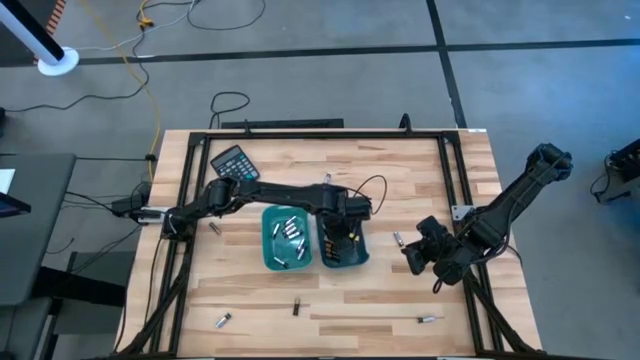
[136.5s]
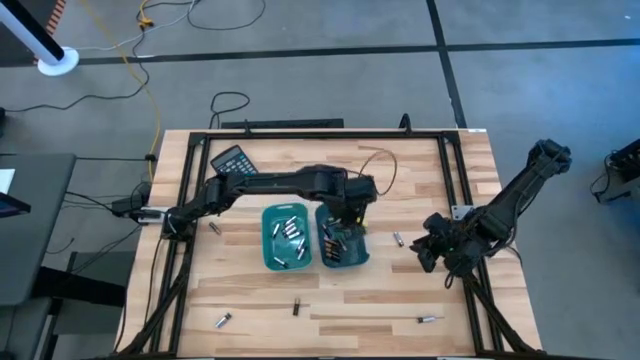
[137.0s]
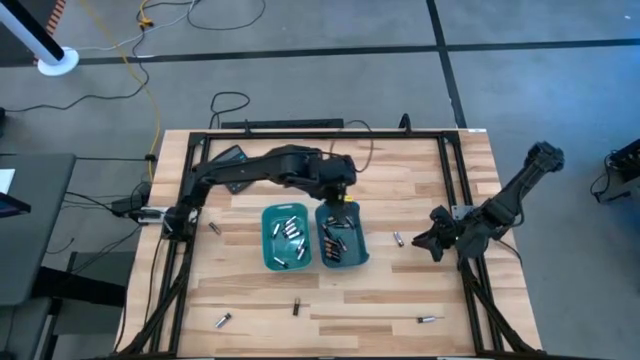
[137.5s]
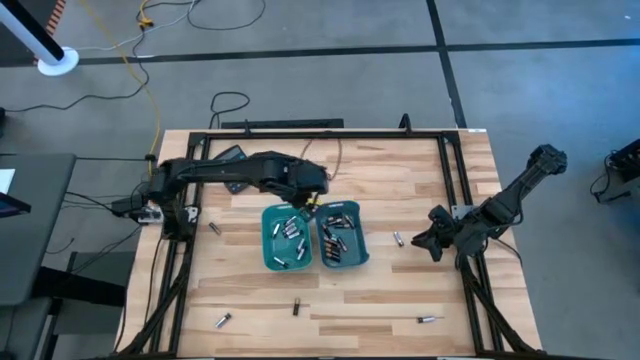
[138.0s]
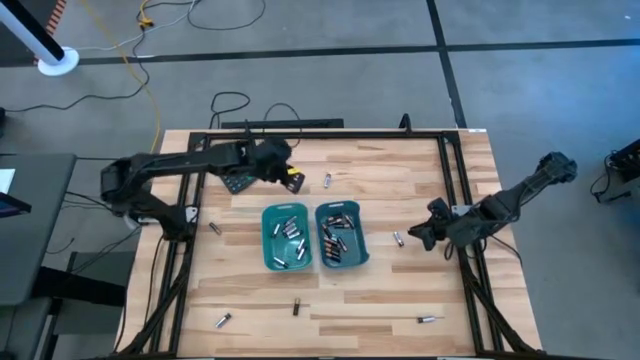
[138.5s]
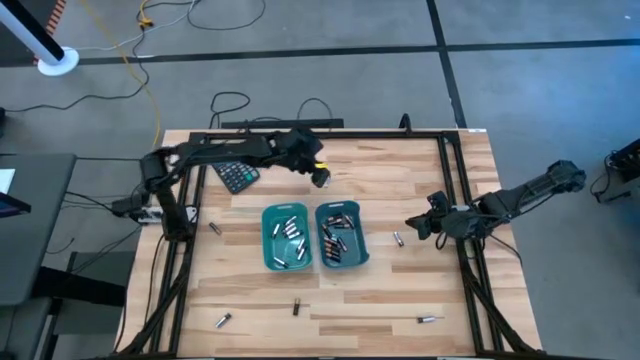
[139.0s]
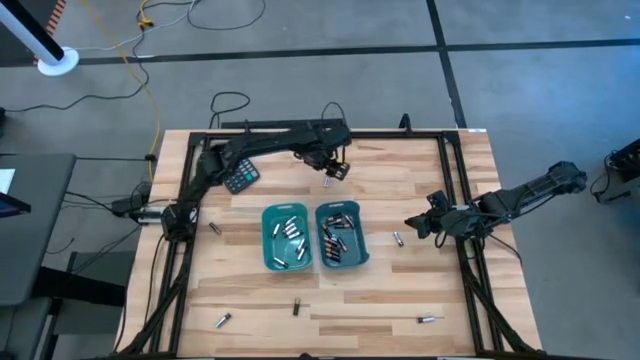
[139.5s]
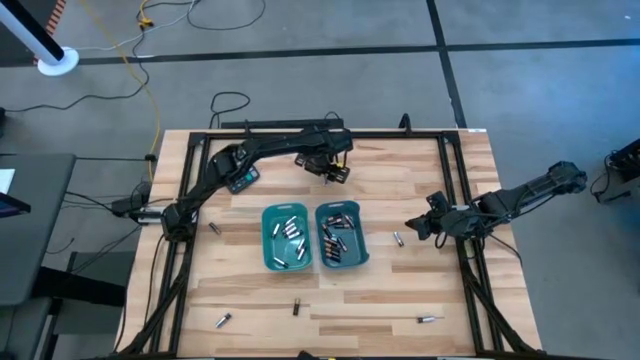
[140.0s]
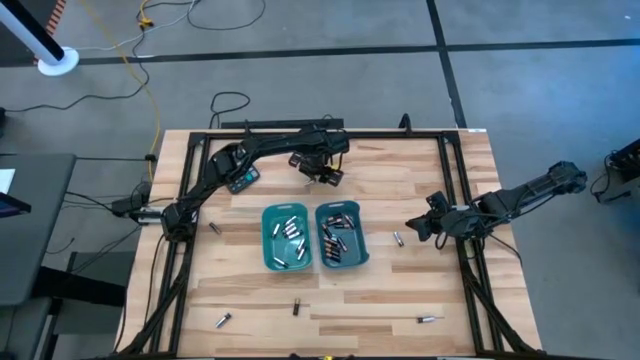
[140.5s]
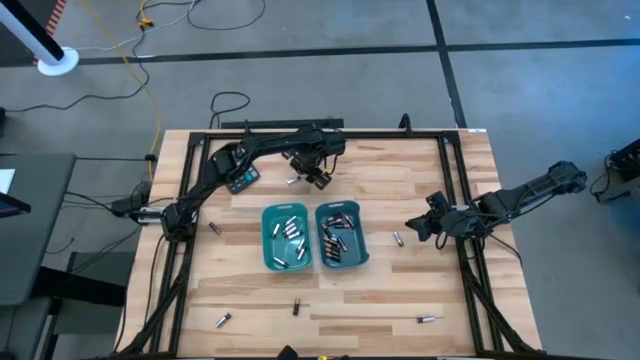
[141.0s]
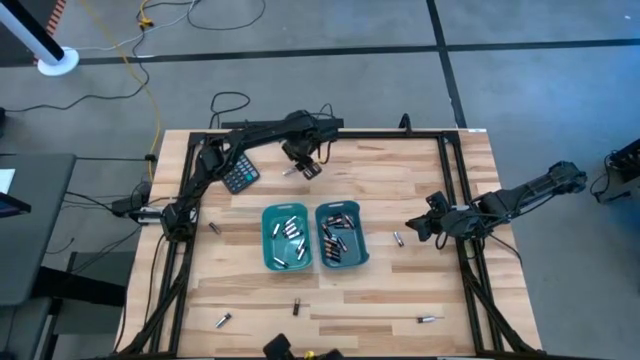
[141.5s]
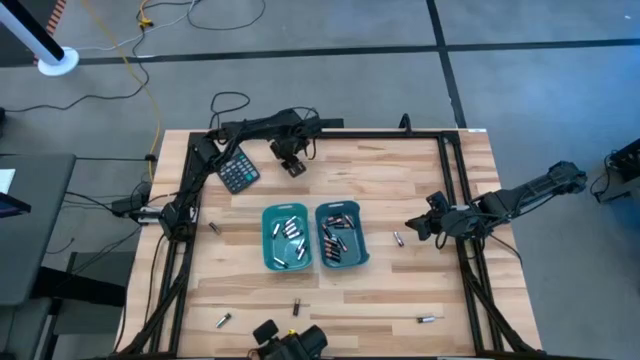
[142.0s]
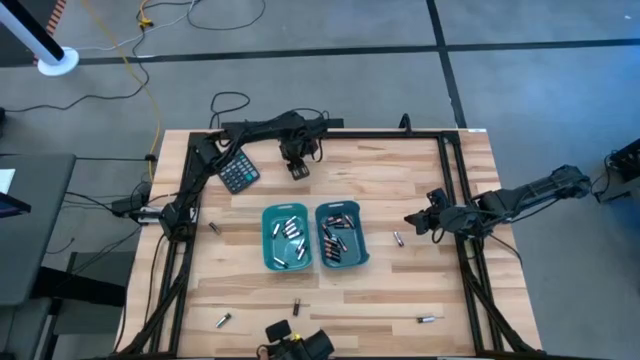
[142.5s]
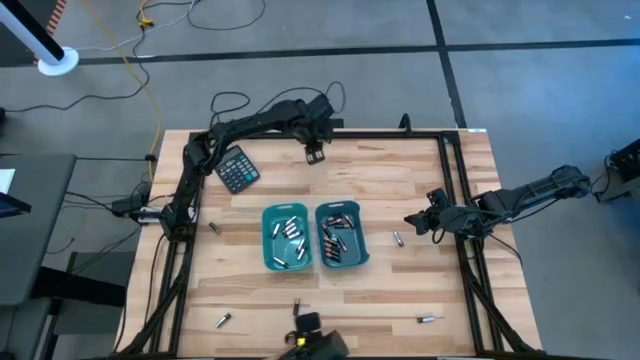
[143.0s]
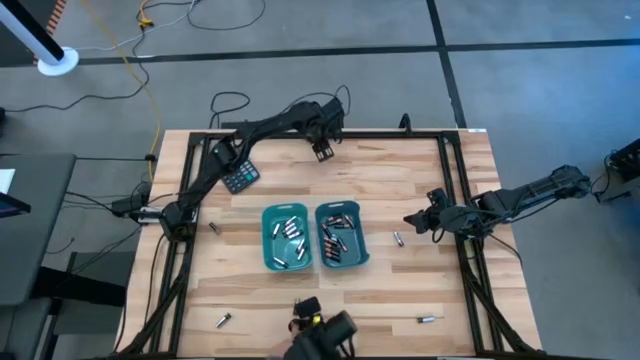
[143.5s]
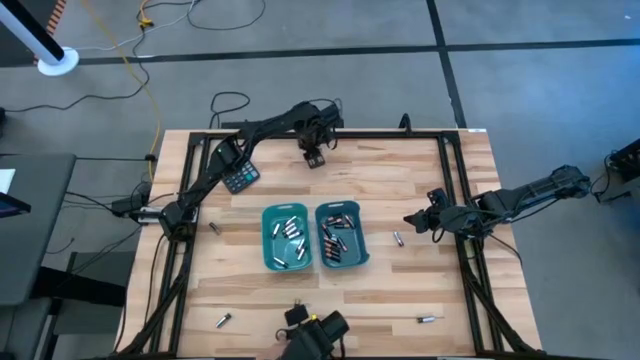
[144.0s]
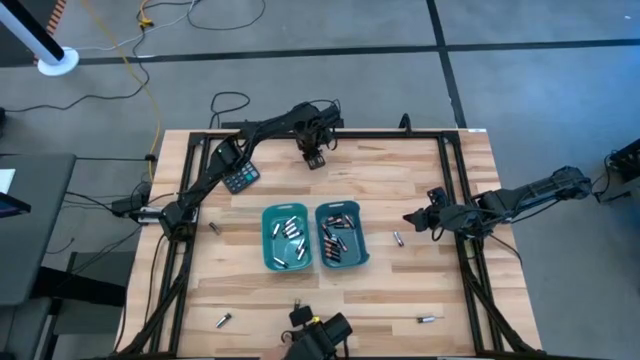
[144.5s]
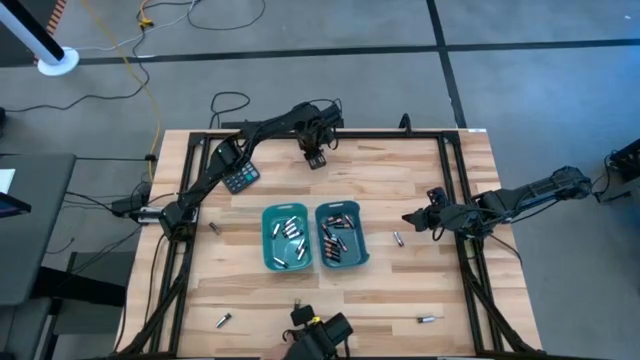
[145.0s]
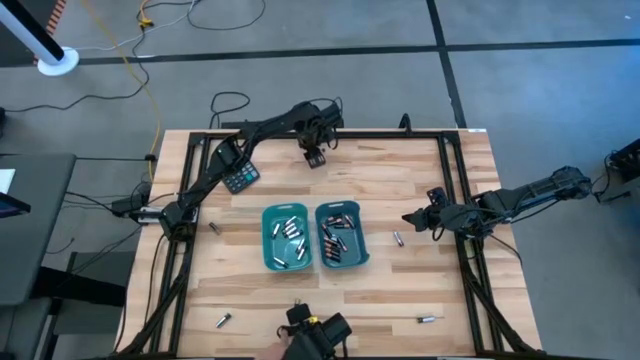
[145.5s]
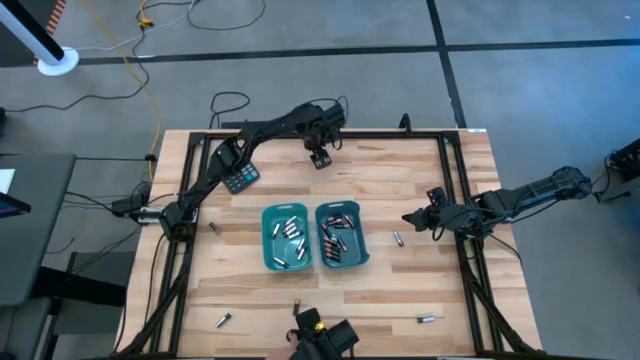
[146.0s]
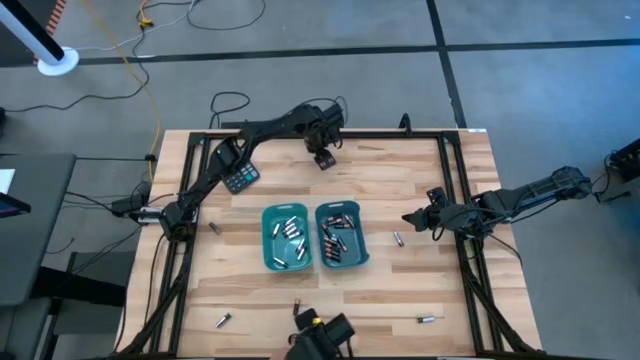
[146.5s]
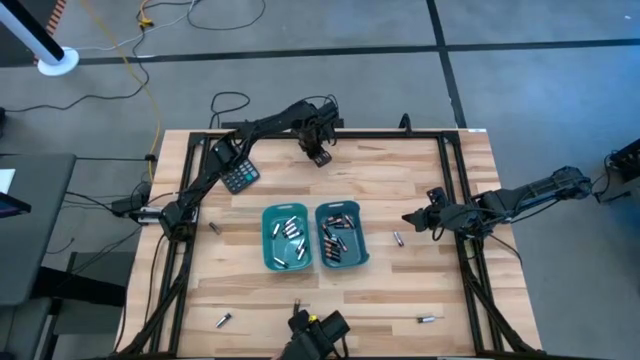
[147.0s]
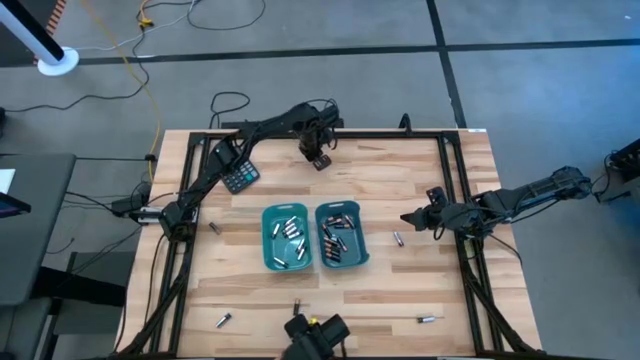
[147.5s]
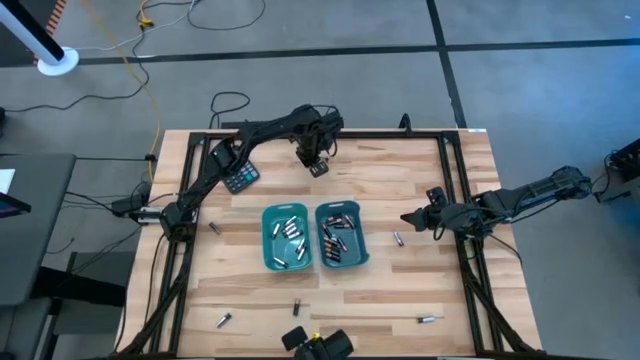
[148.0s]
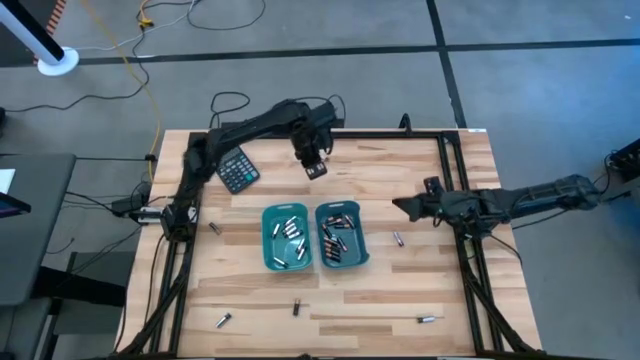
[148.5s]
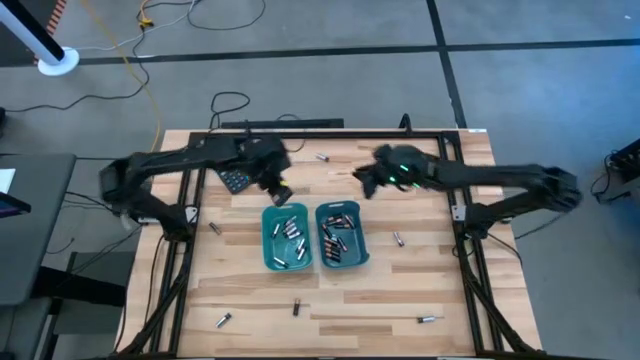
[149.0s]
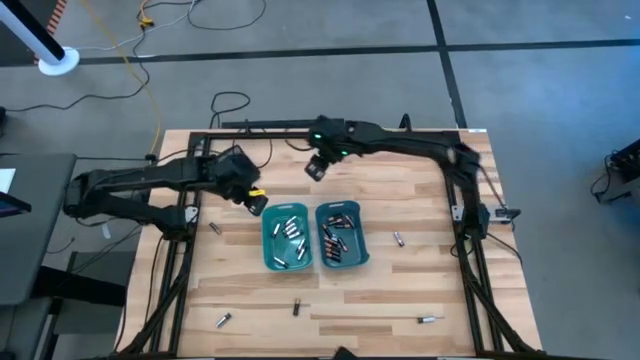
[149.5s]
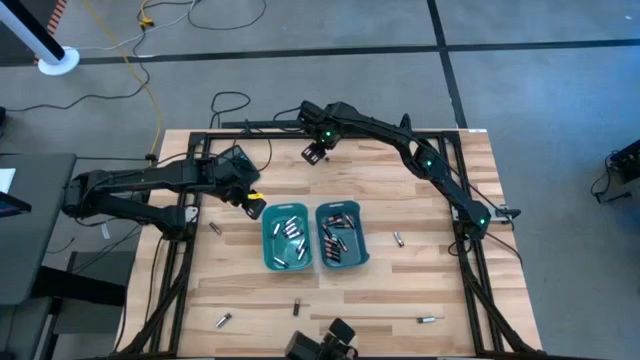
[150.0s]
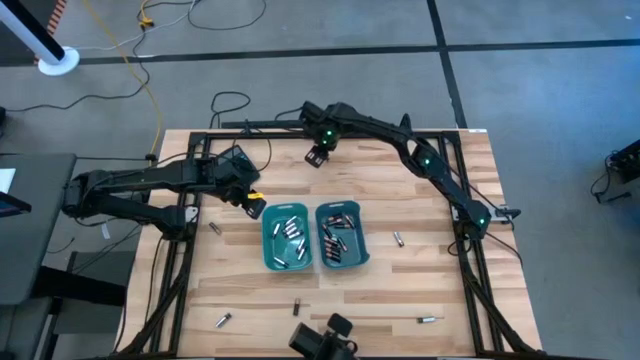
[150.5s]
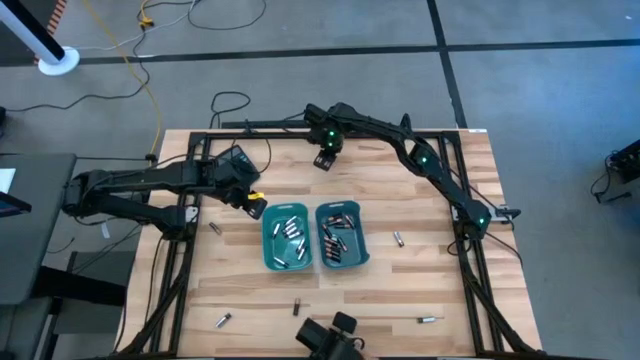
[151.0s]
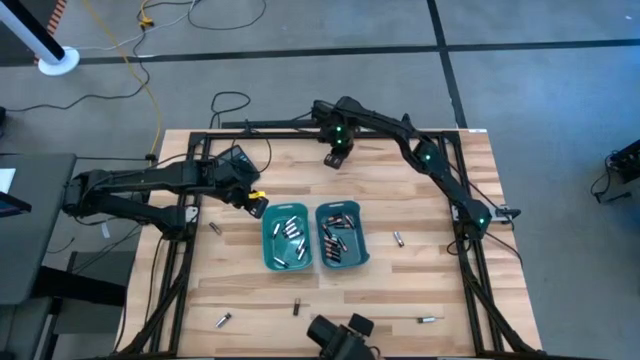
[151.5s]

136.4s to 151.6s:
Task: Sort batteries
Put the silver battery into the green bin

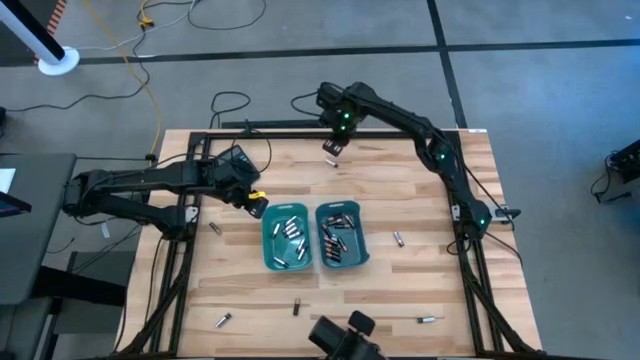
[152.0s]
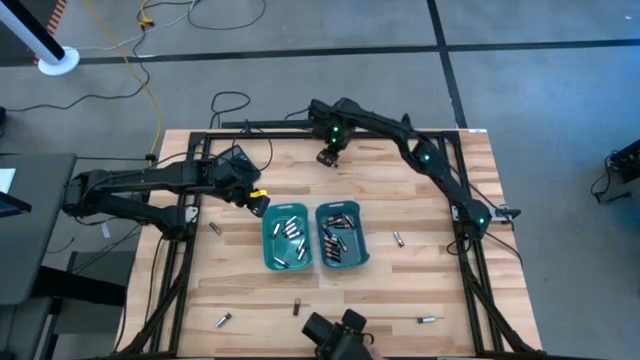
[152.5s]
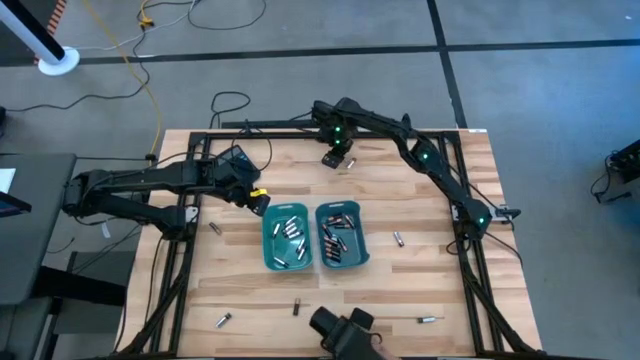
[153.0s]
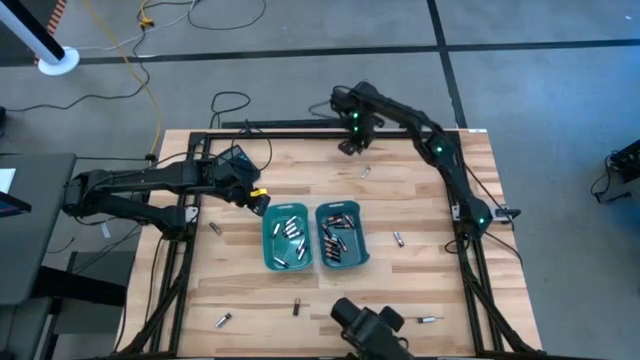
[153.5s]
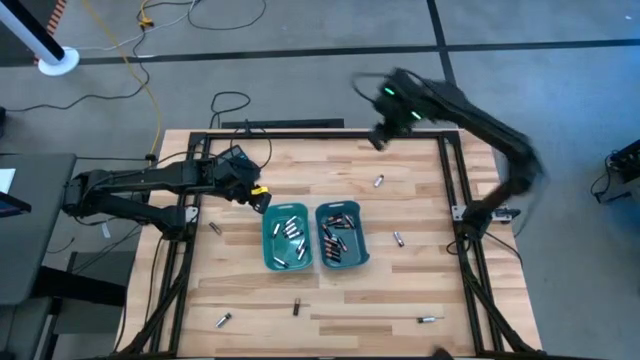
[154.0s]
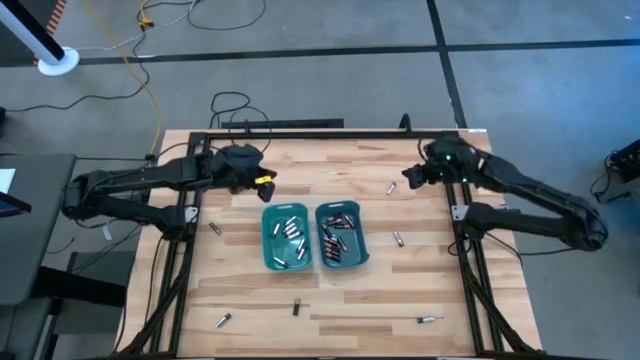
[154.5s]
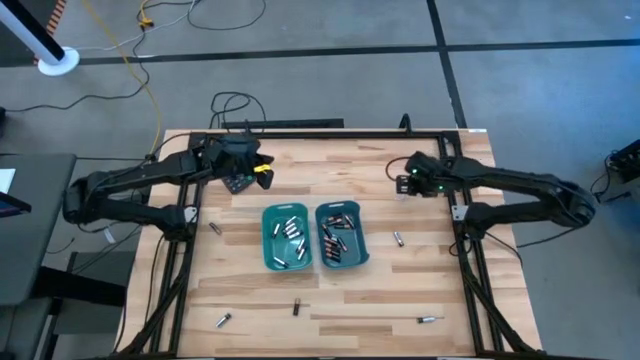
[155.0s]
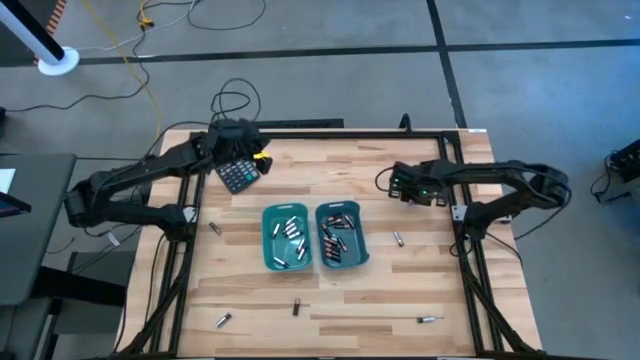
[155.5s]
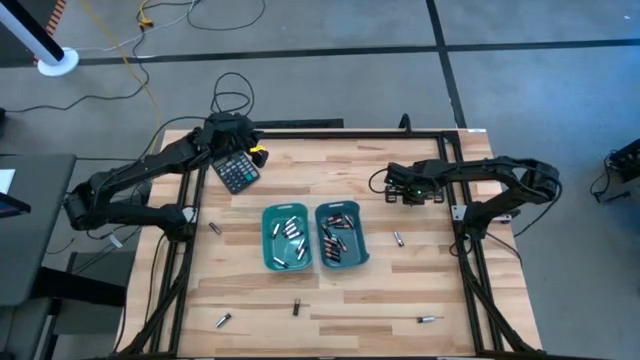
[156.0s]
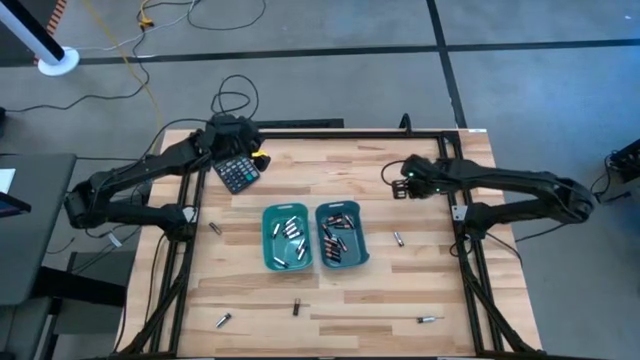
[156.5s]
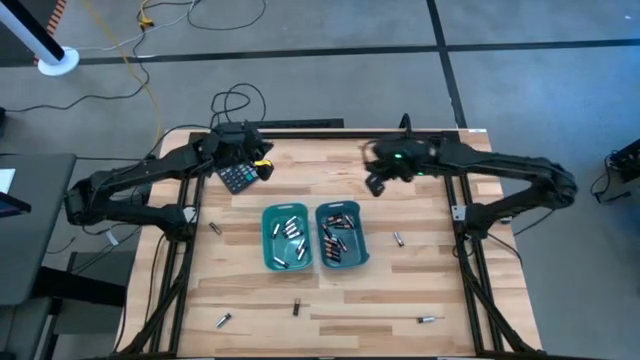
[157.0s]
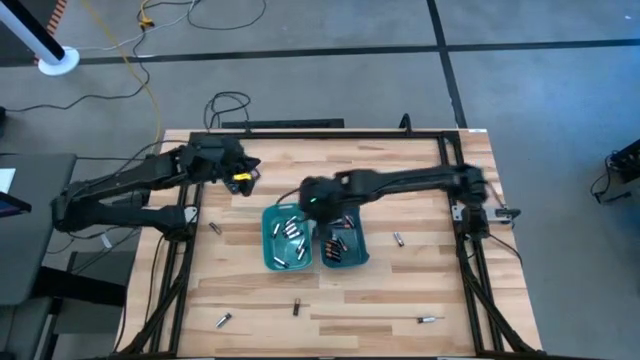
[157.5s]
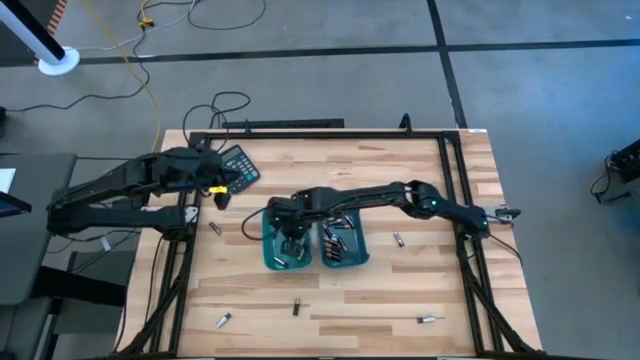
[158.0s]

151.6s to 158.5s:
Put the silver battery into the green bin
